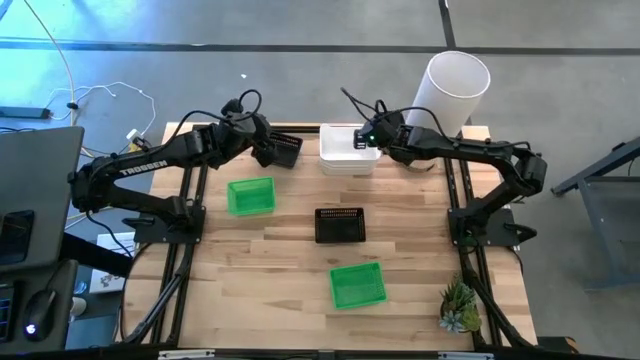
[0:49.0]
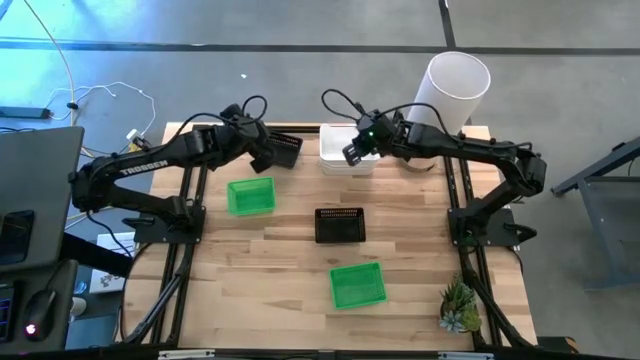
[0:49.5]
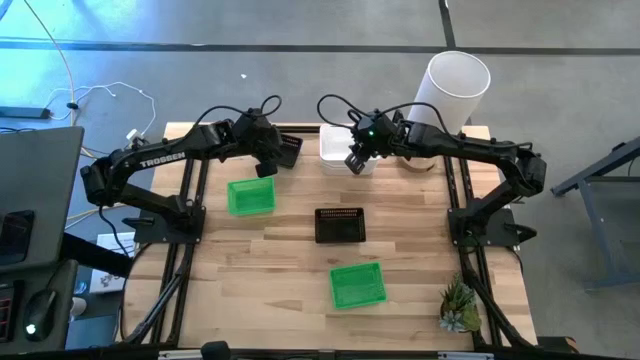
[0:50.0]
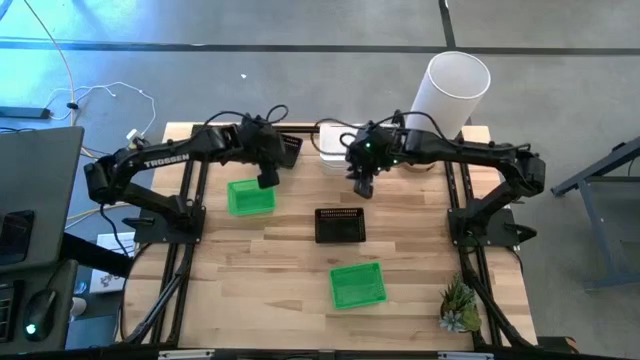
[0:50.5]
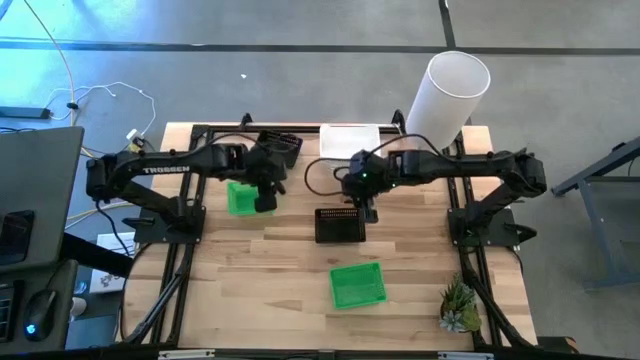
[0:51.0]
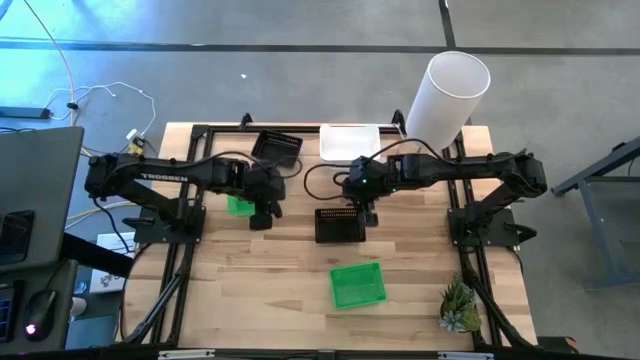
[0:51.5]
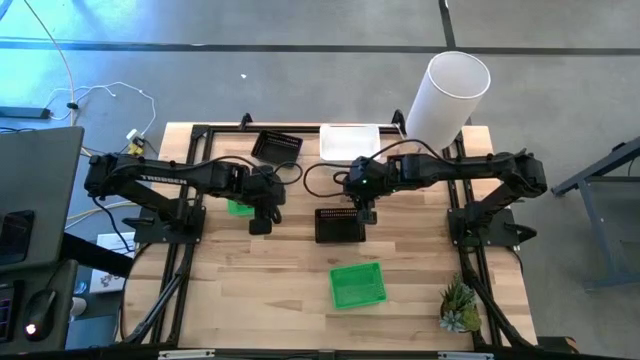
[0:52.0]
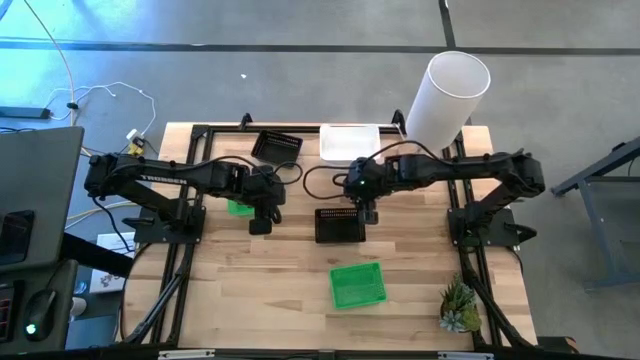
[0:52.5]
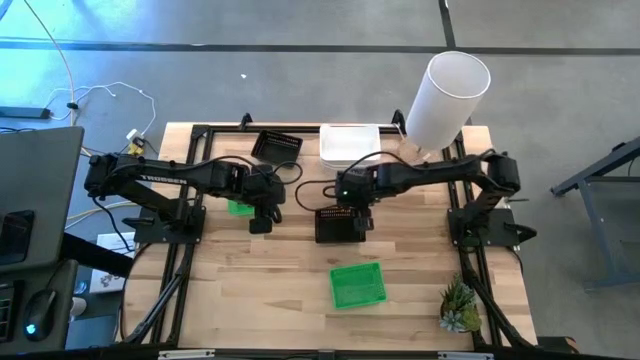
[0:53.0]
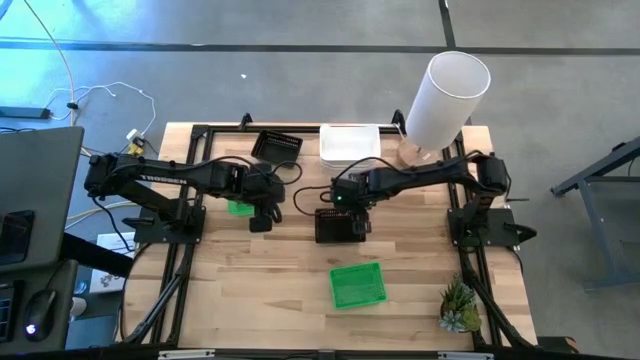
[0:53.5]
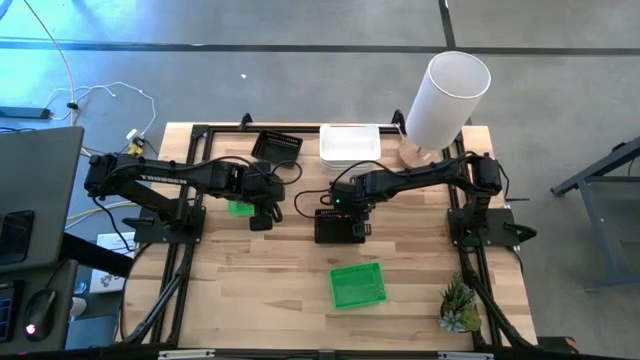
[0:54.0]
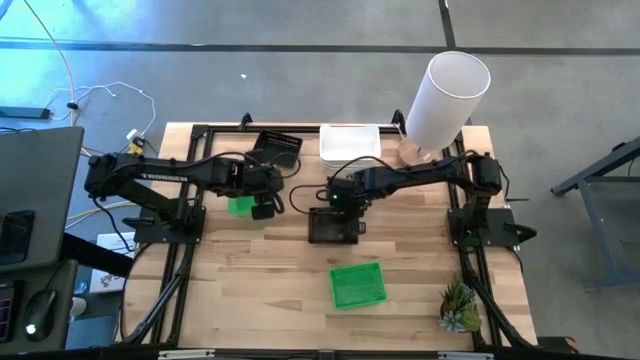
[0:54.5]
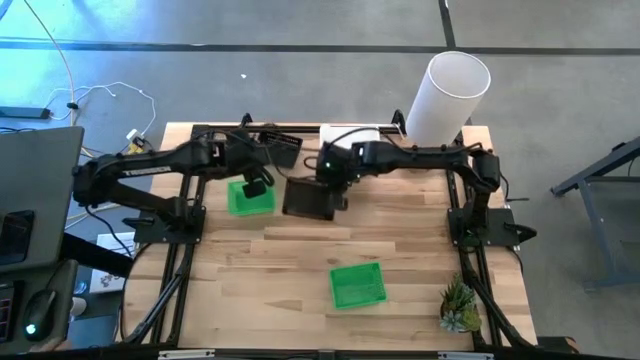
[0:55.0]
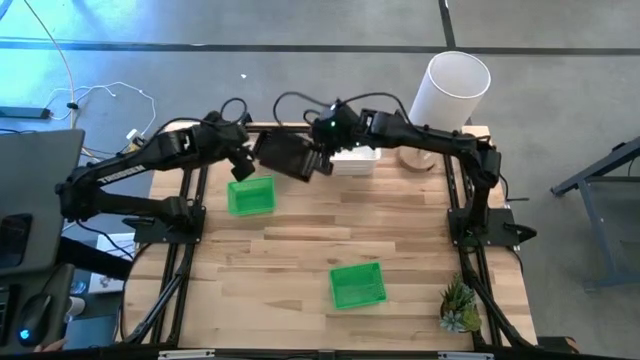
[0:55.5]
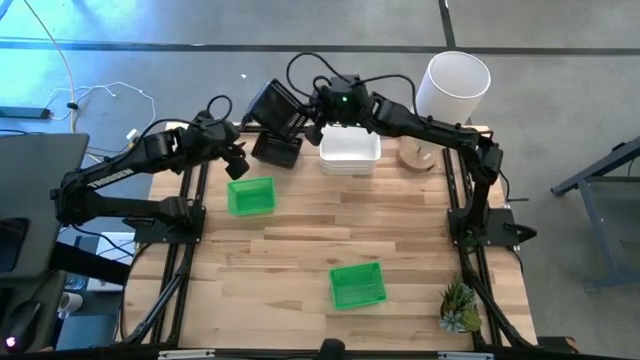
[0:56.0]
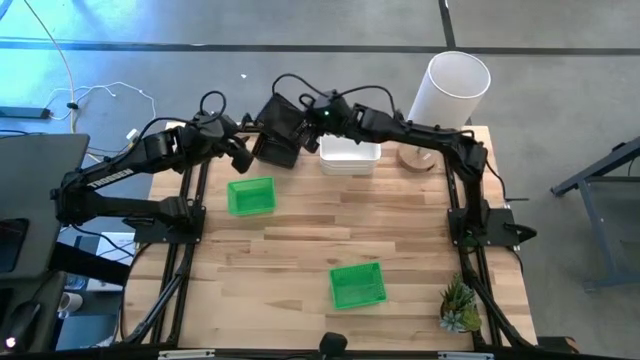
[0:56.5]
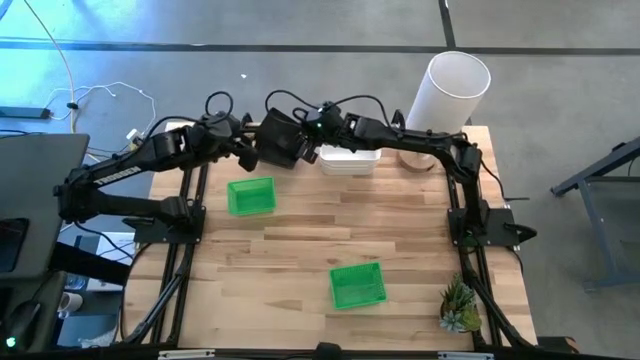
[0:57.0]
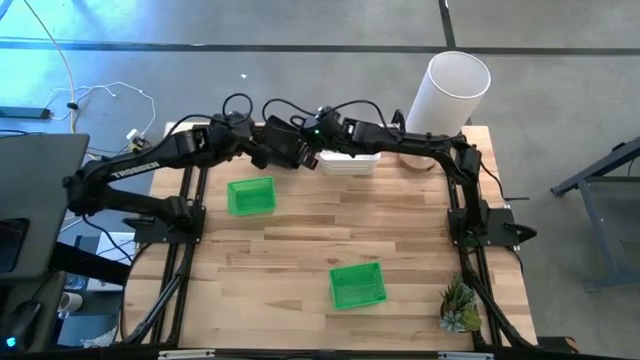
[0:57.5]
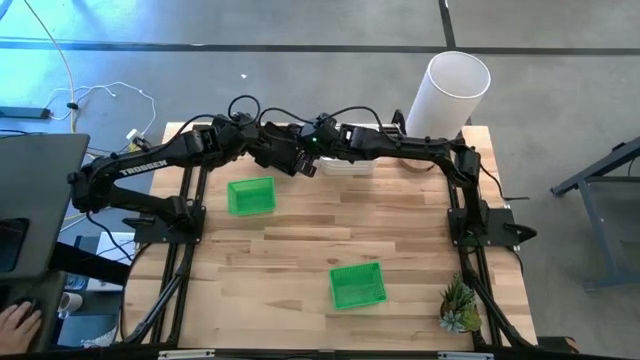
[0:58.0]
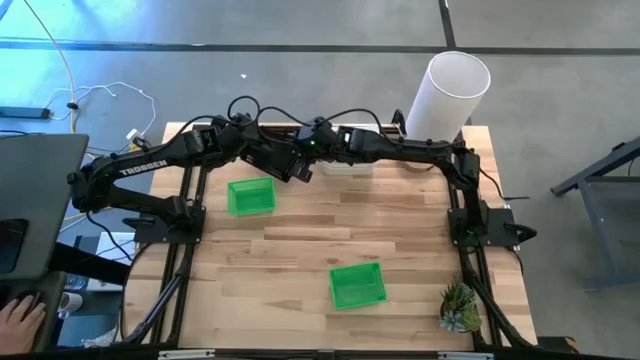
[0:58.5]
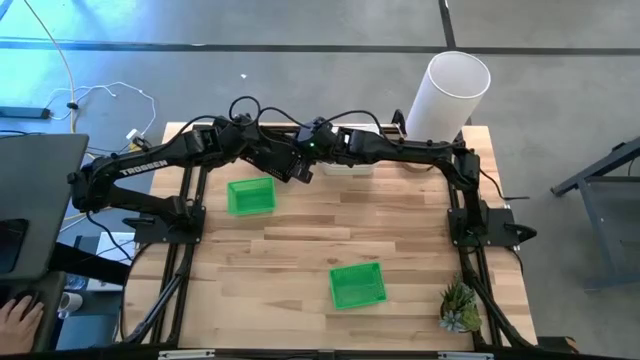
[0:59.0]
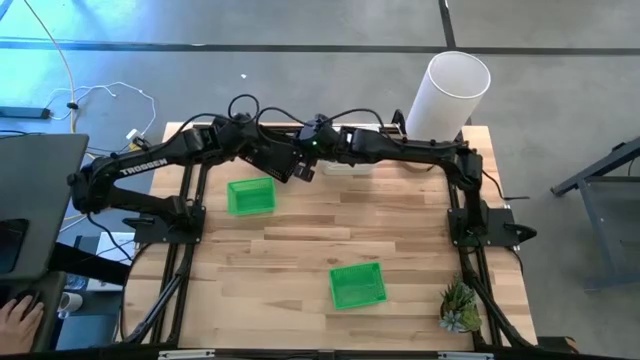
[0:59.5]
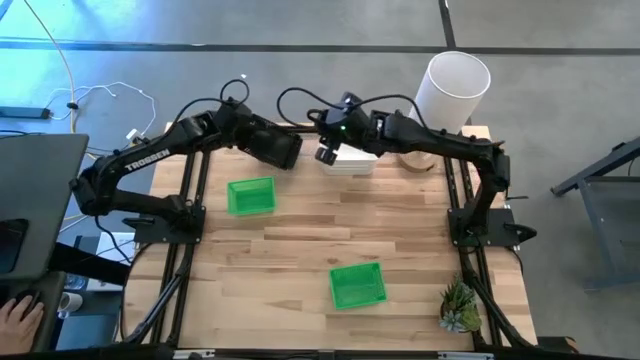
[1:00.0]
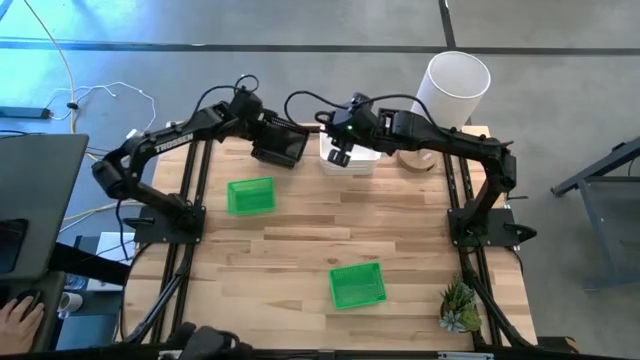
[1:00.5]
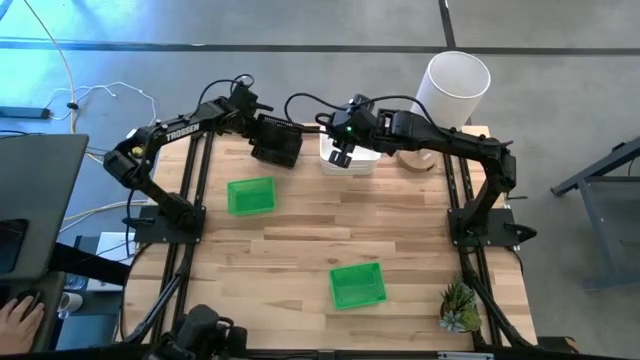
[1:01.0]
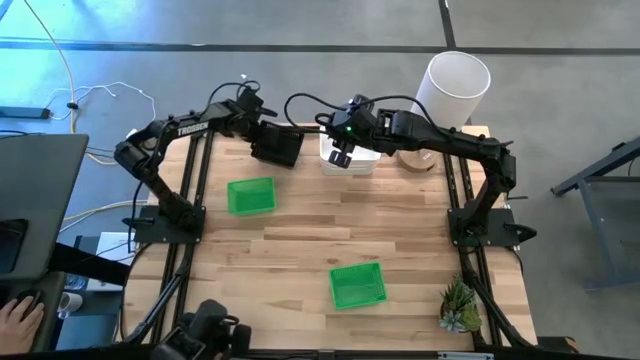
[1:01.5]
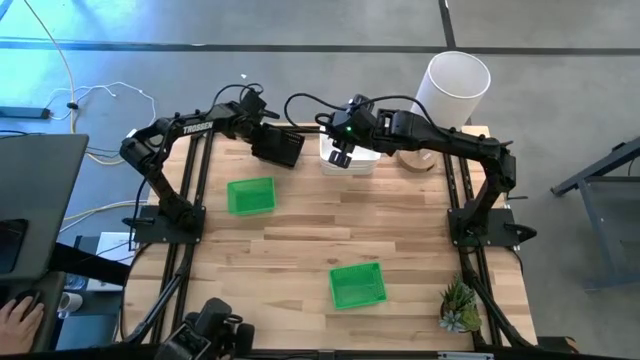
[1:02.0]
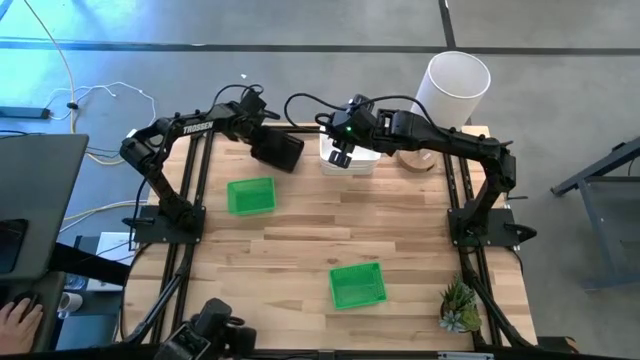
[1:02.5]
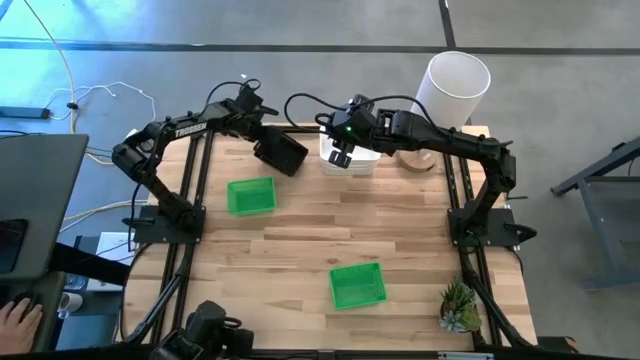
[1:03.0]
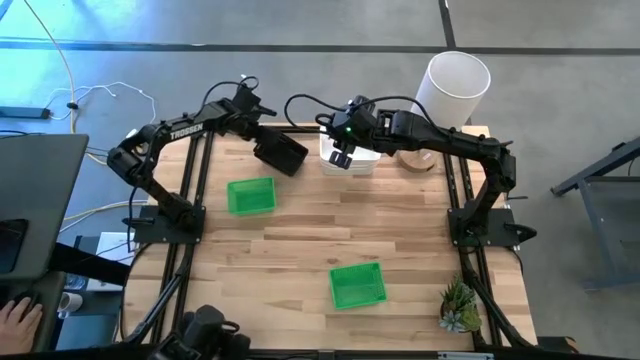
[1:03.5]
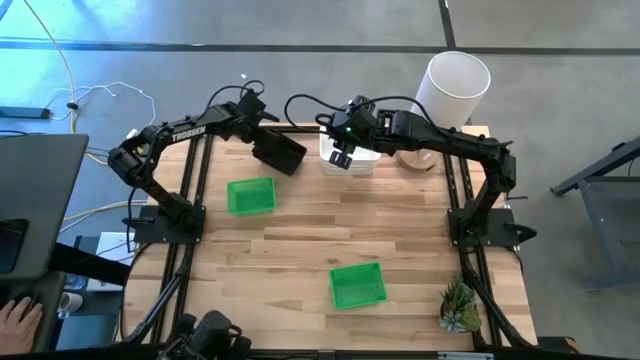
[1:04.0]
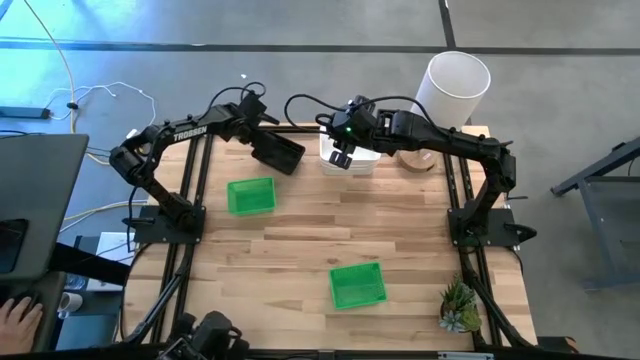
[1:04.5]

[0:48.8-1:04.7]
Task: Stack baskets on shelf by color
Stack the bottom black bin on the stacked black bins

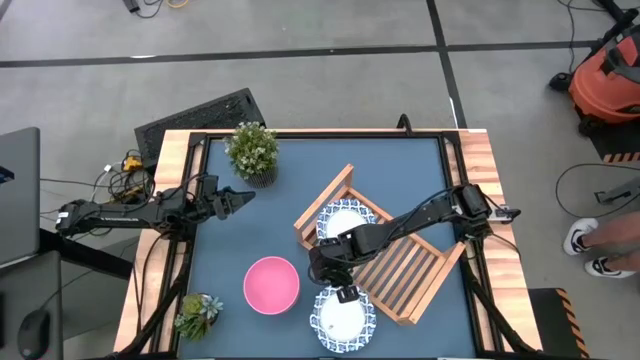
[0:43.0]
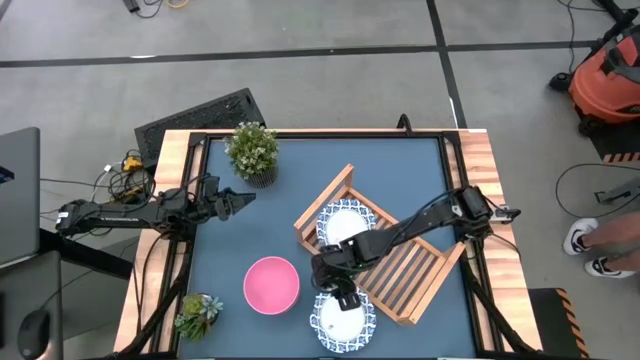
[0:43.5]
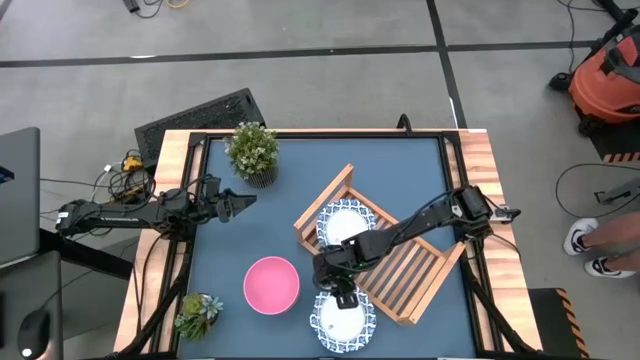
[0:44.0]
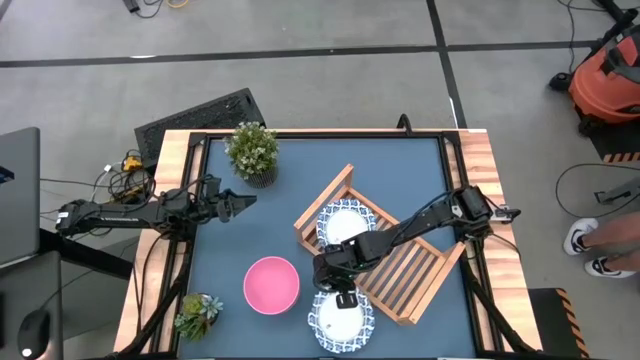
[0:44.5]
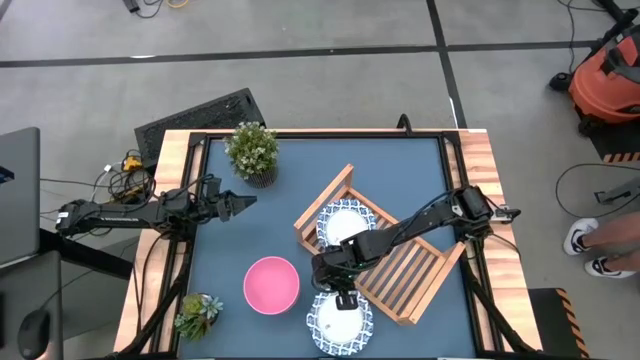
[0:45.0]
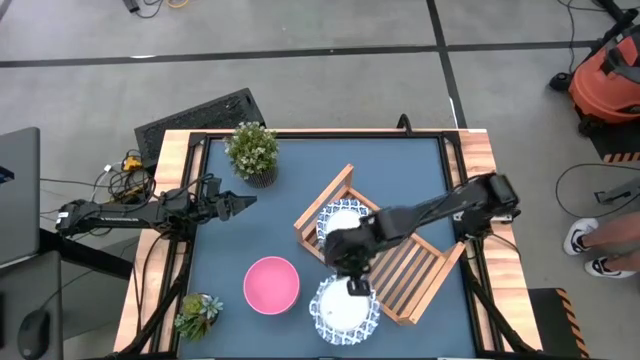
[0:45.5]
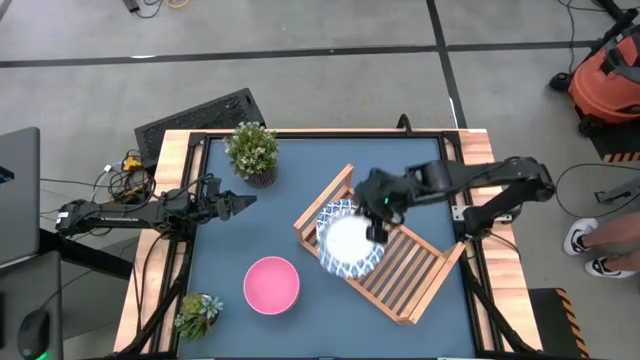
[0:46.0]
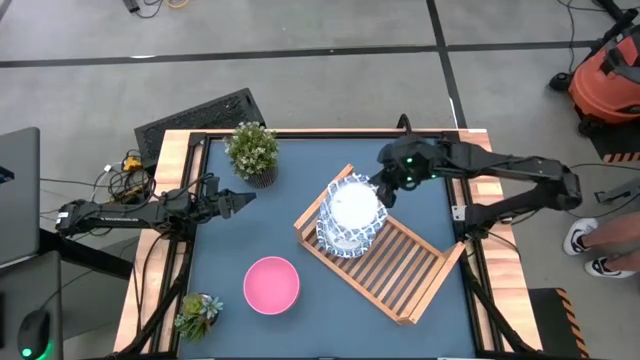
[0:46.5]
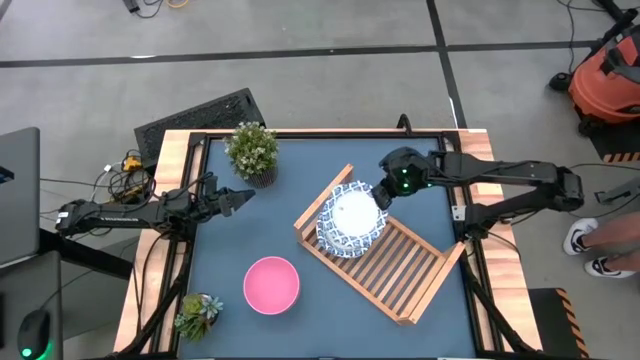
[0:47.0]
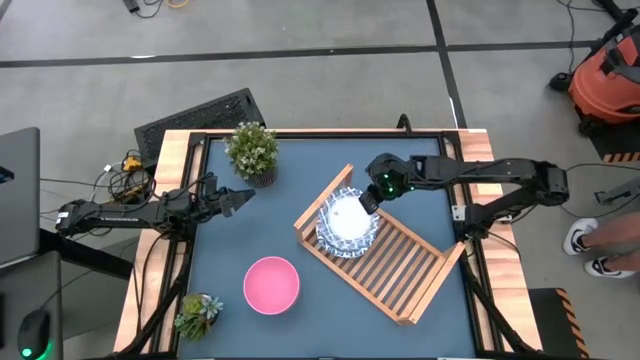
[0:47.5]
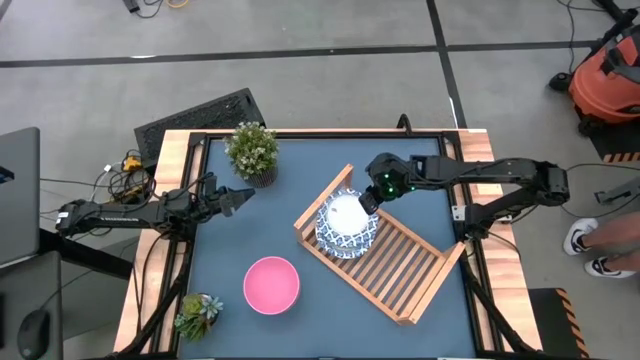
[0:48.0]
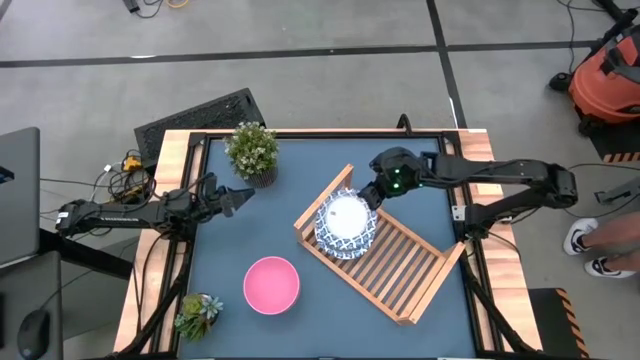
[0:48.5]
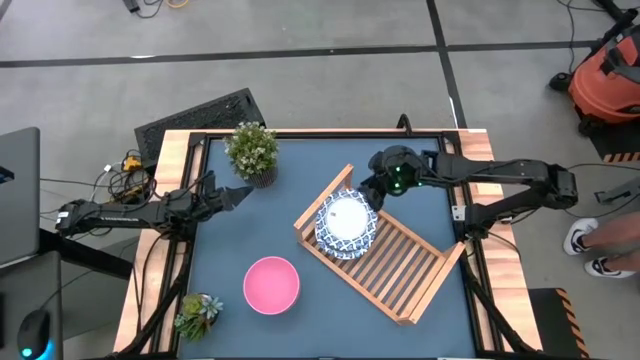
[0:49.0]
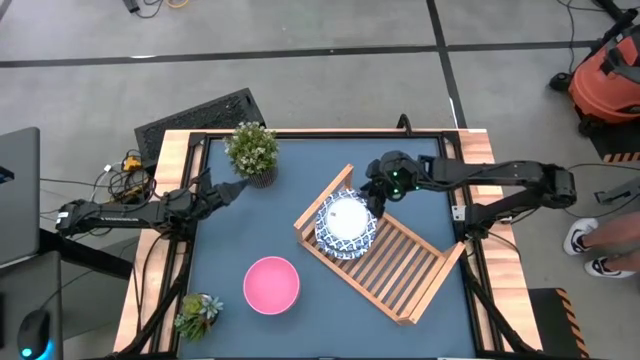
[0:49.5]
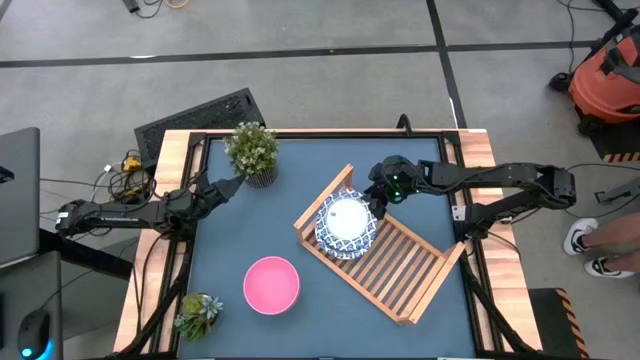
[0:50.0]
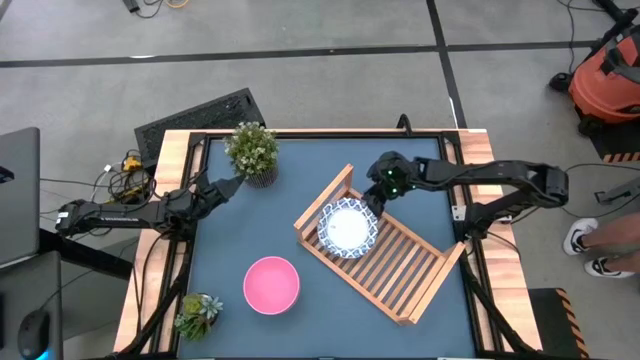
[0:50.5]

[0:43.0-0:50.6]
Task: Place and stack bowls onto a shelf
Stack the blue patterned bowl on the top of the blue patterned bowl on the shelf
